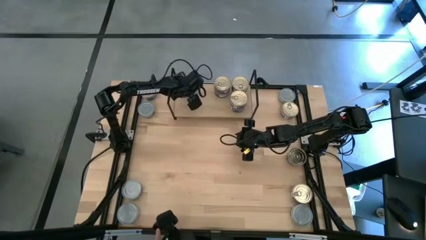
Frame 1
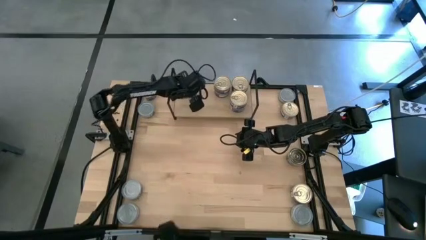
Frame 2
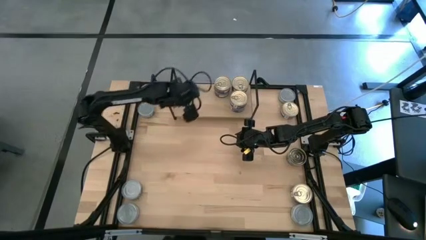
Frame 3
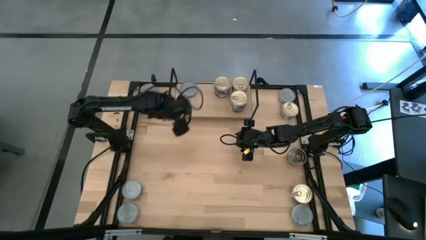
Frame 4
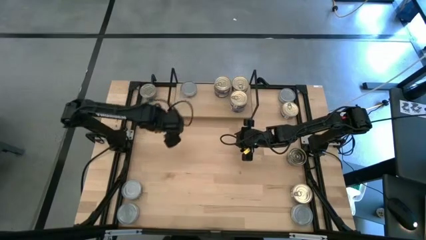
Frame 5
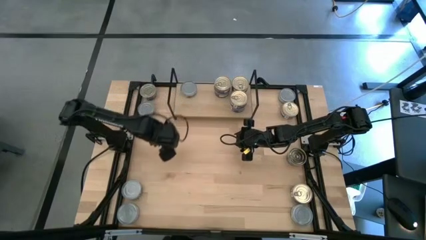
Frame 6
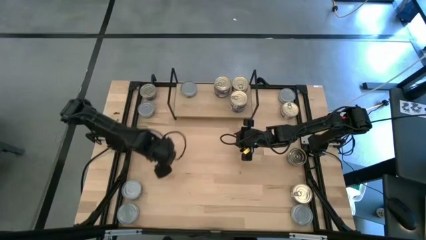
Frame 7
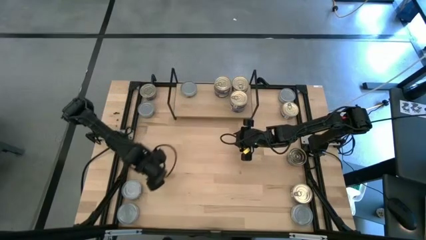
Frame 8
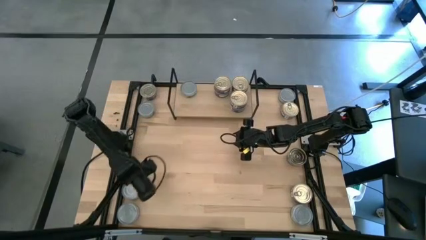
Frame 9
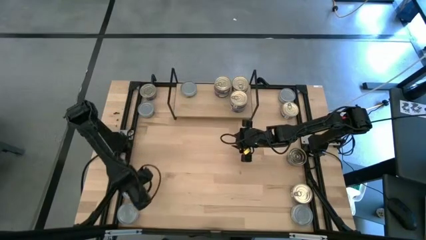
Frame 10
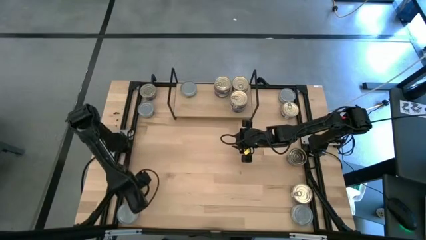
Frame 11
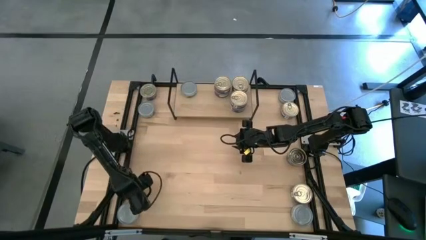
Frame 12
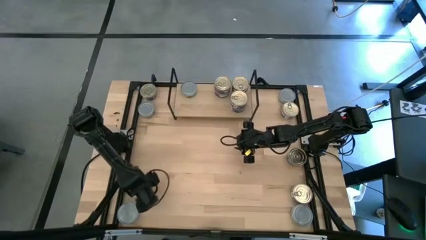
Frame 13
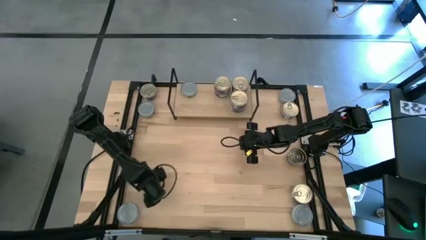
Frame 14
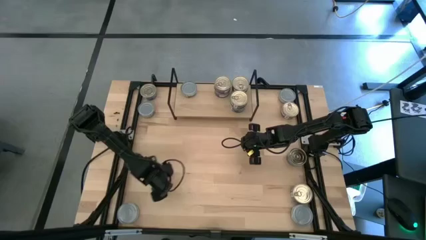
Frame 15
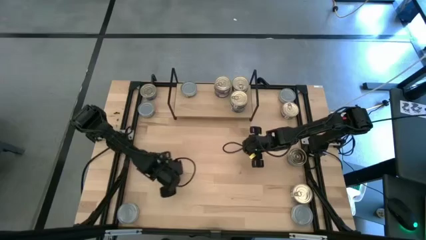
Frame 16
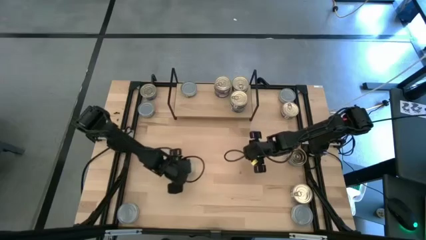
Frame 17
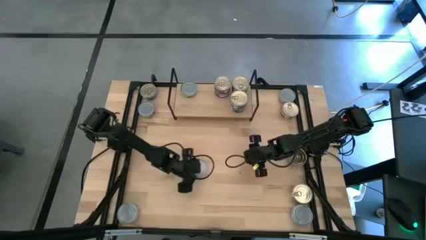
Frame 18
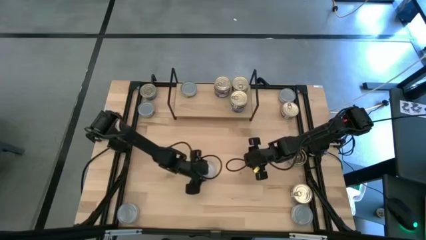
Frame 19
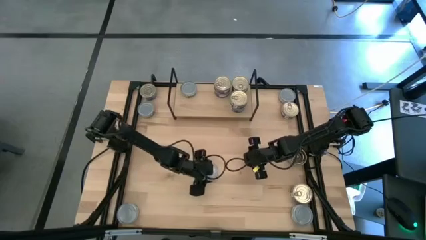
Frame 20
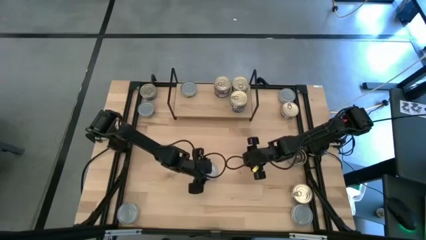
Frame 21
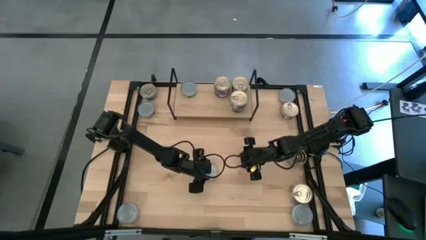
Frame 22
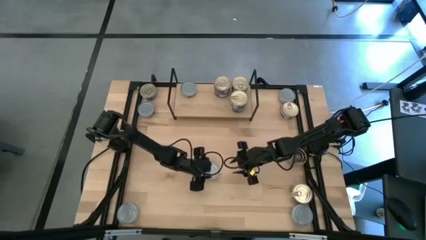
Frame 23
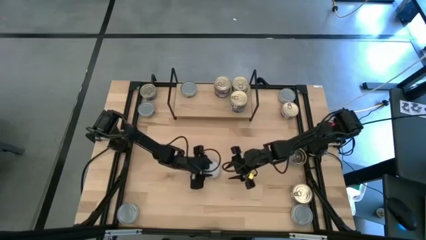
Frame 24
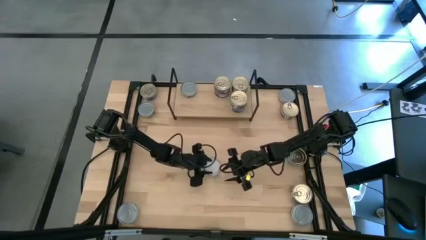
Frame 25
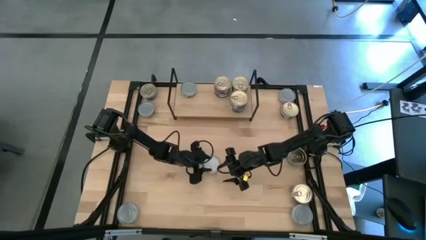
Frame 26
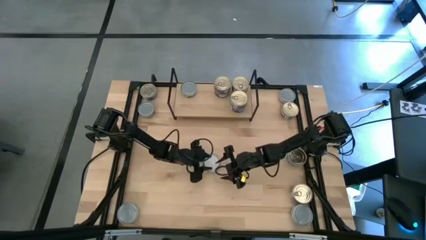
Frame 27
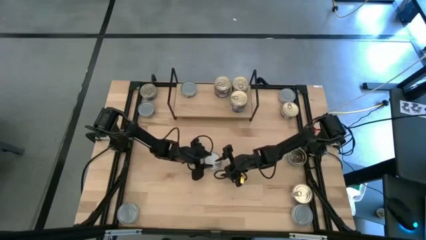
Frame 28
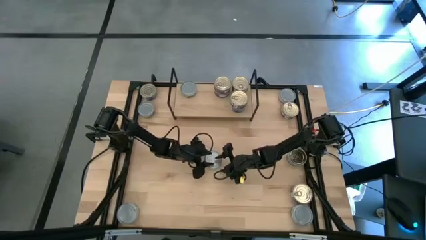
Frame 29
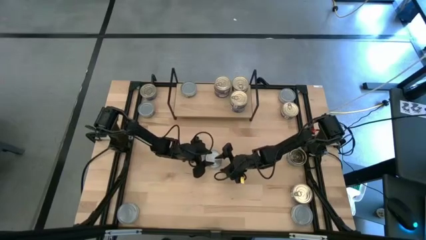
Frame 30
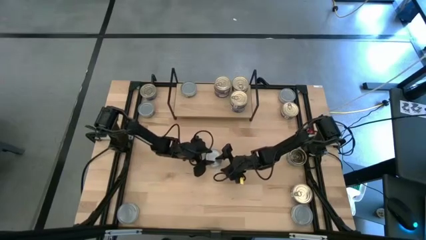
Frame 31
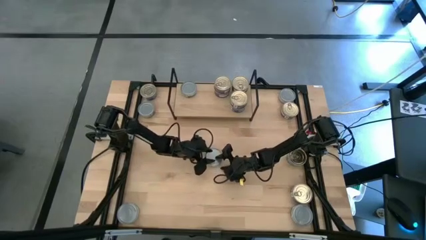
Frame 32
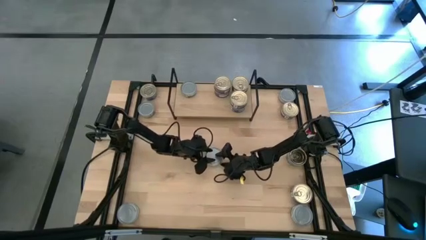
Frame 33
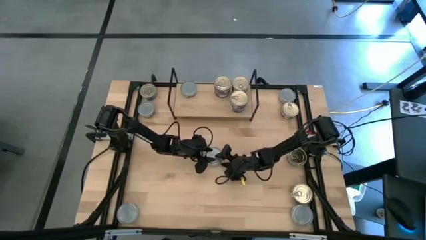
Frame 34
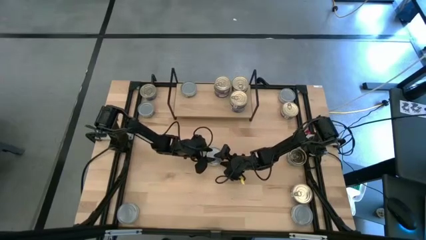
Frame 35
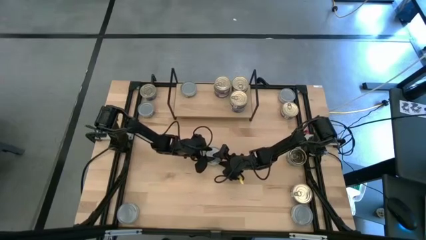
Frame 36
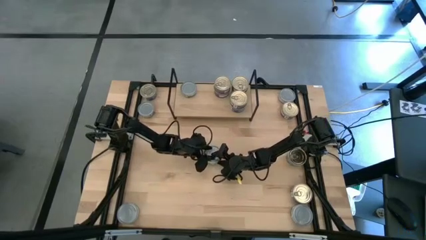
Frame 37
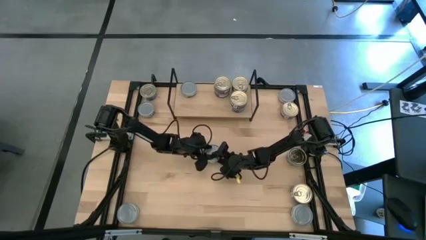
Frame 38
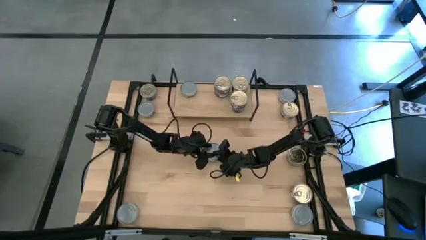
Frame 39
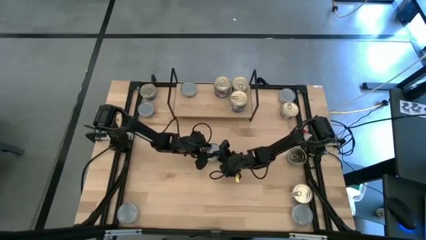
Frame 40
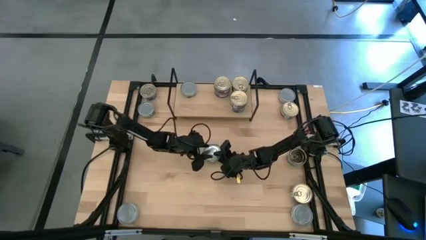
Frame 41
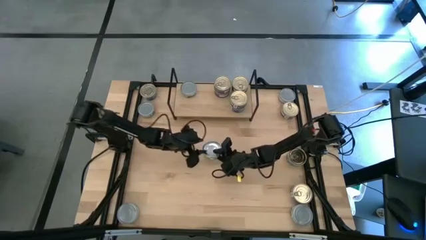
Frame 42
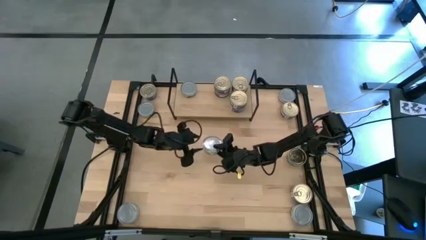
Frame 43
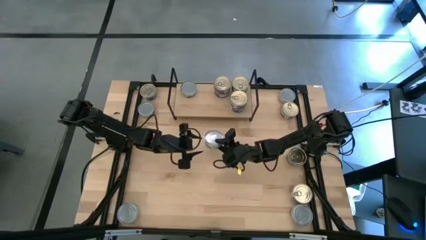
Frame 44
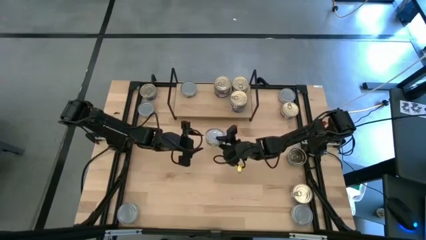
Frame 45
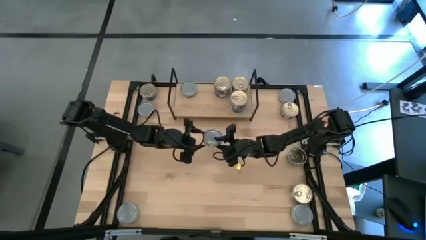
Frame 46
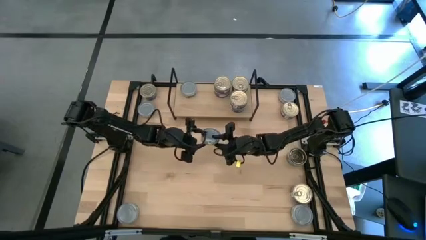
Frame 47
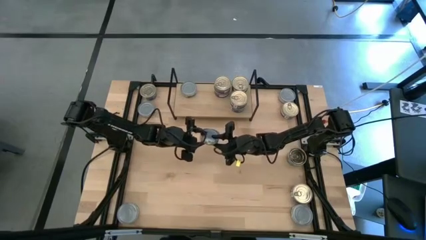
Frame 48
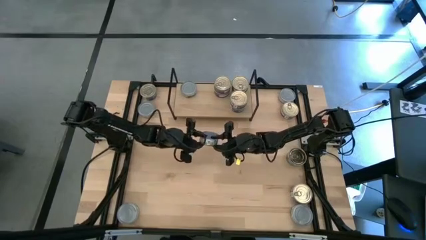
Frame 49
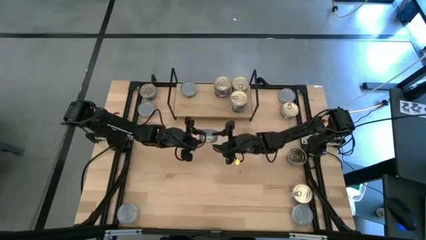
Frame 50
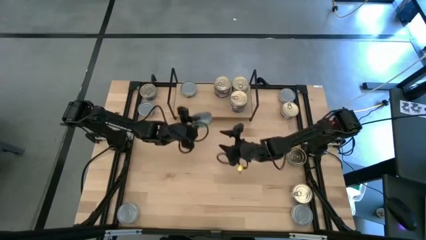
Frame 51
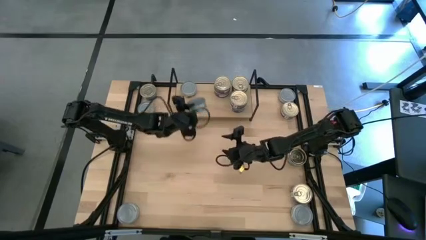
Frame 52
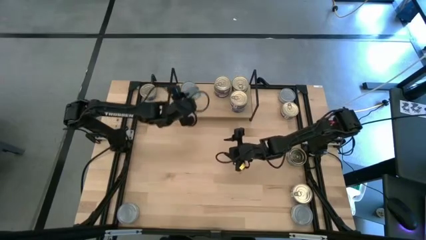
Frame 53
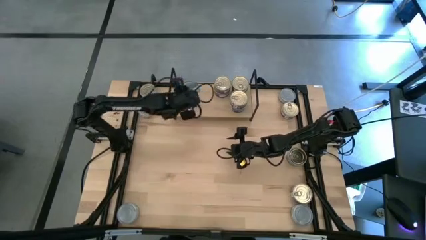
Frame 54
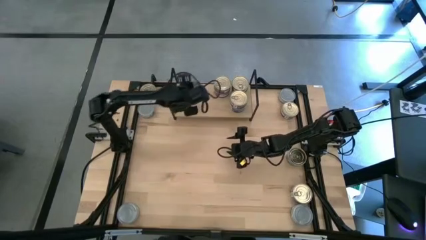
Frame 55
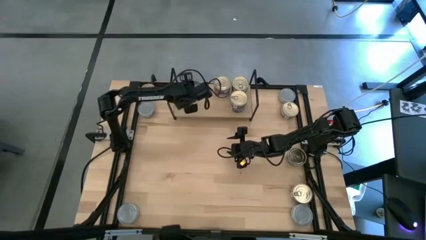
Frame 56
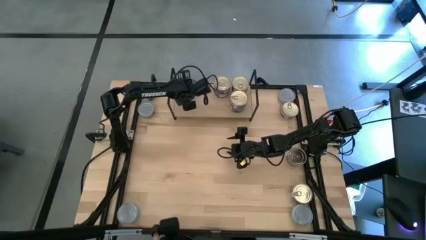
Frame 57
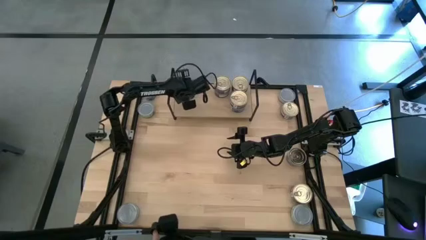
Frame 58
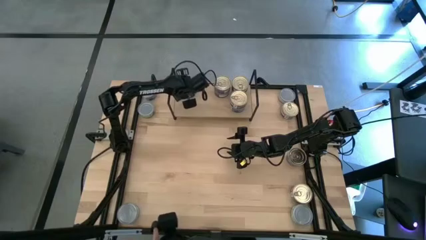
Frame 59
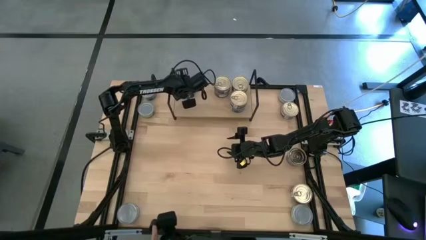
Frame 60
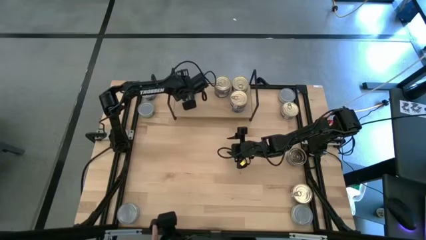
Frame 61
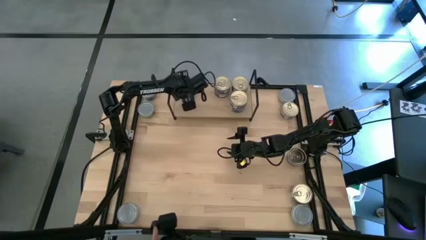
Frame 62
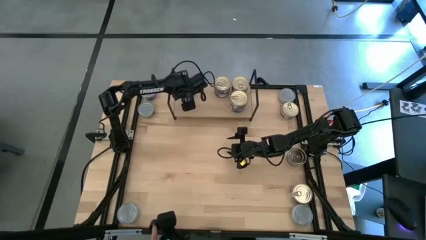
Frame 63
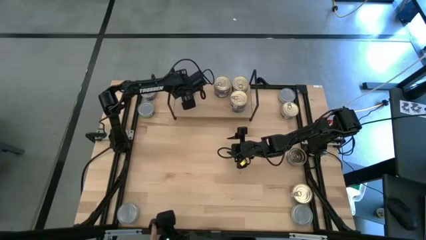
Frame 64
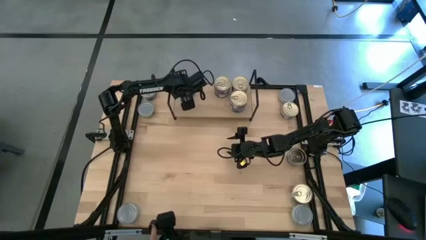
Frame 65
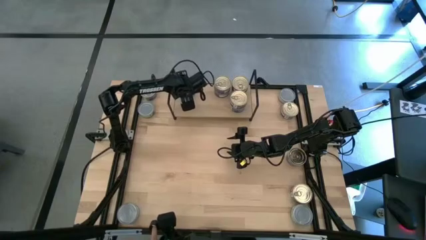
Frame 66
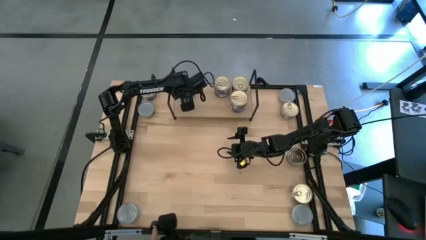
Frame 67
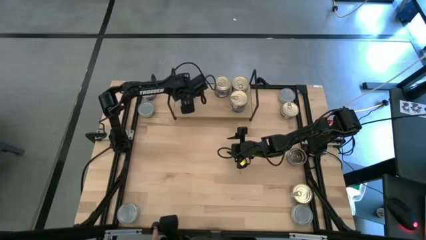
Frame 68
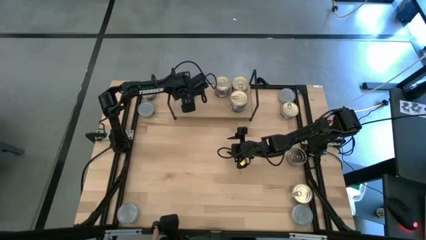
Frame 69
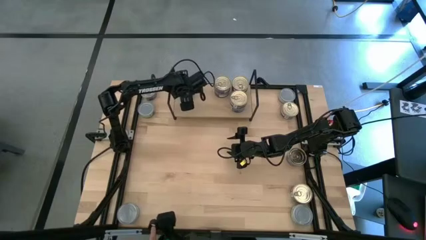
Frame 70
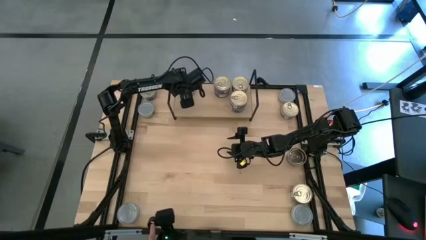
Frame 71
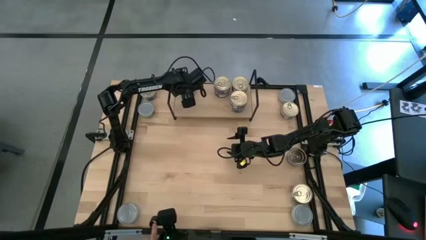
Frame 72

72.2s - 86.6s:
Task: Stack canned seafood by type on shelf
Stack the green and white tuna can on top of the green and white tuna can on the shelf

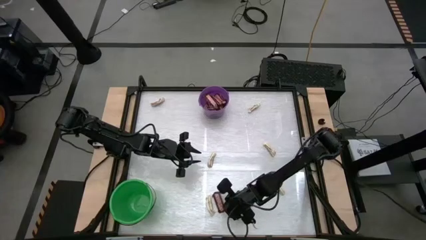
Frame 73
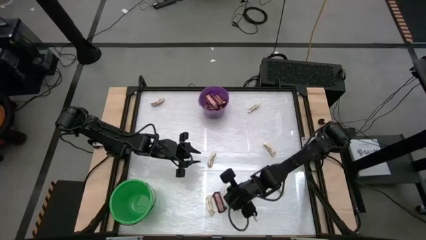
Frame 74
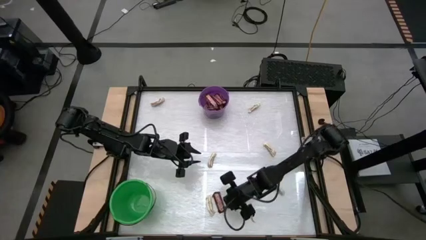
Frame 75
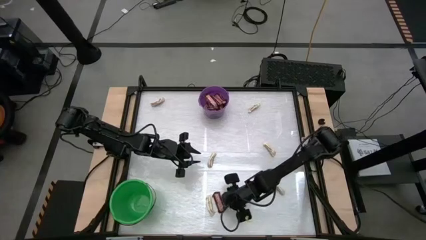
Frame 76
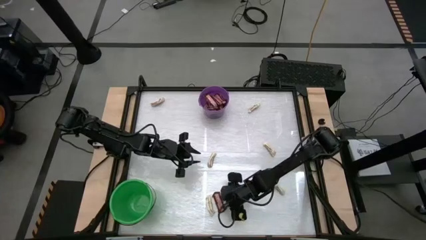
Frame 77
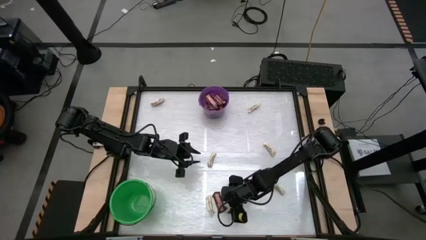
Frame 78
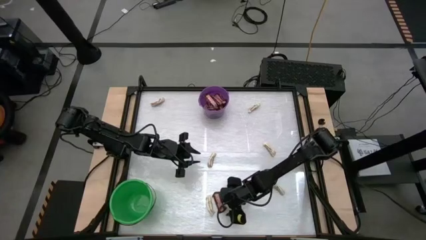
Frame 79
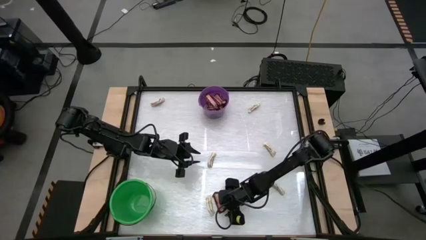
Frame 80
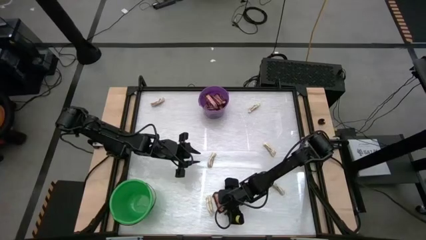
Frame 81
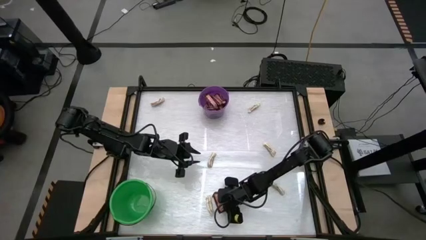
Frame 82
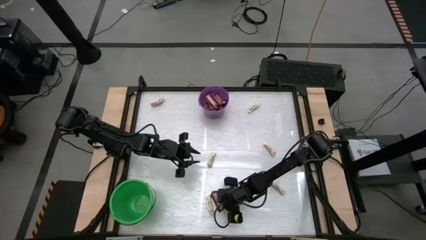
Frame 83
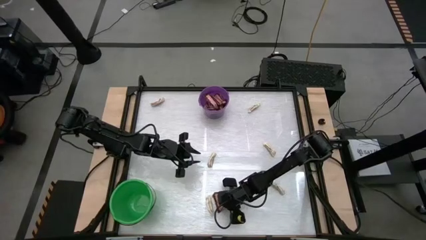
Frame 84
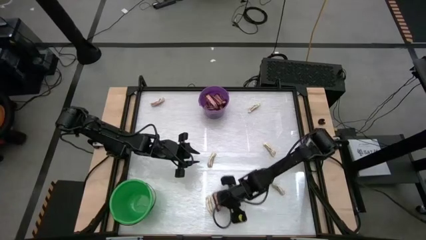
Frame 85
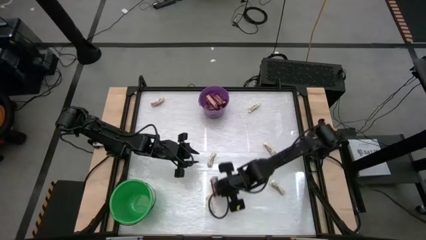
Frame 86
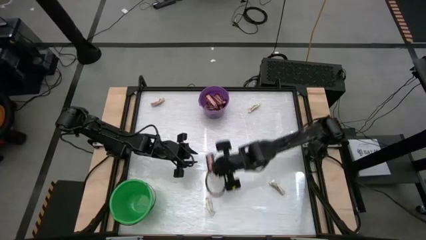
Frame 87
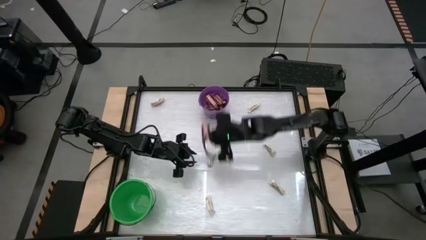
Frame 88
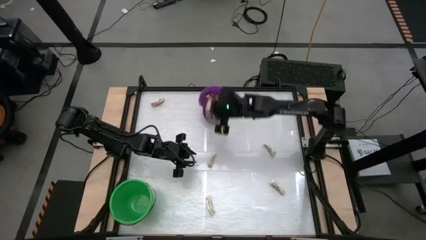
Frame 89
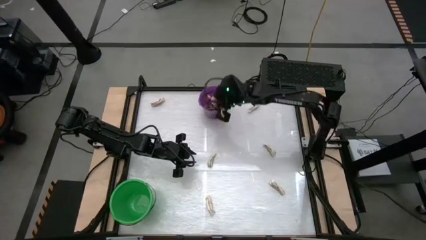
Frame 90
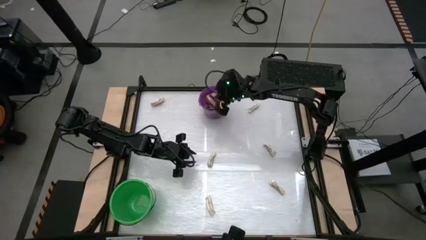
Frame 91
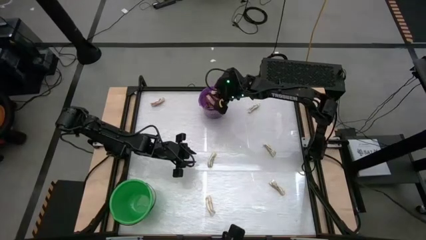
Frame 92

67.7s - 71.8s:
Task: Sort candy by brand, put in halloween buckets
Put the brown chocolate into the purple bucket
